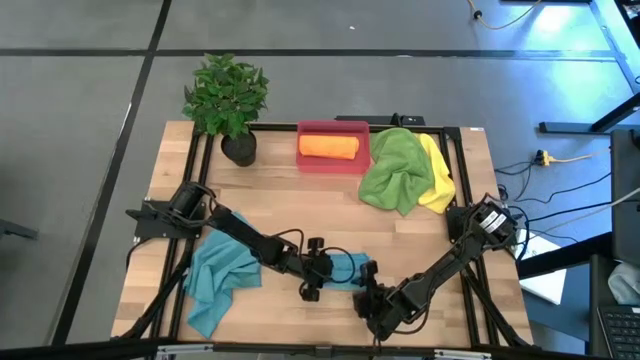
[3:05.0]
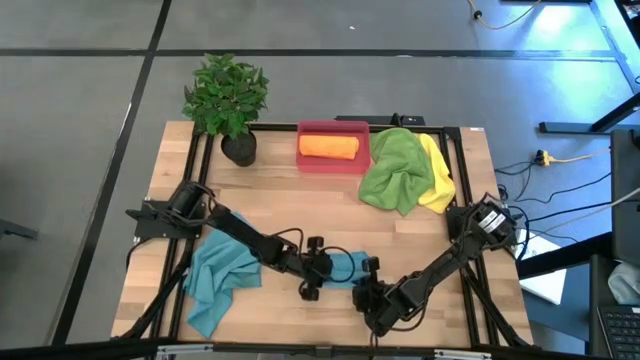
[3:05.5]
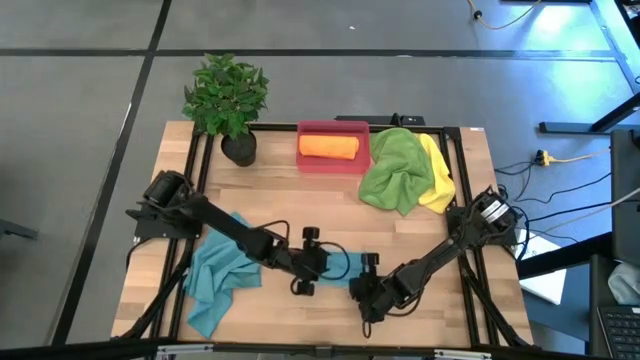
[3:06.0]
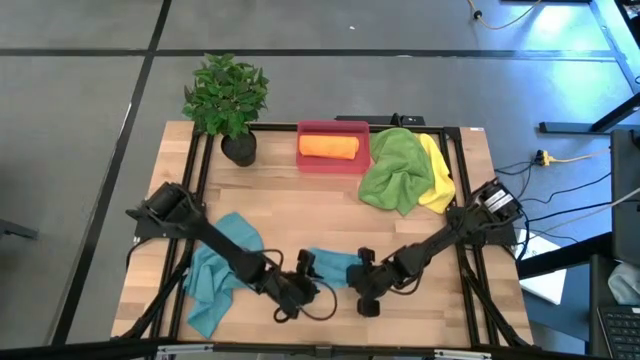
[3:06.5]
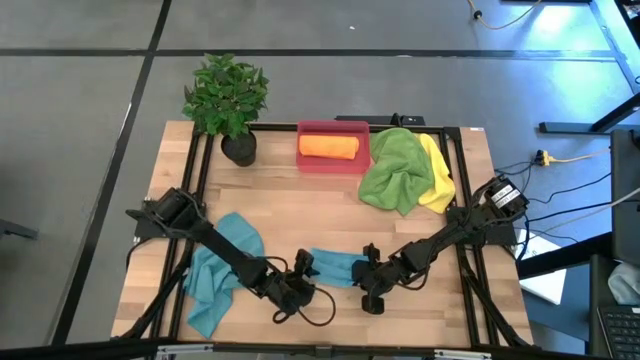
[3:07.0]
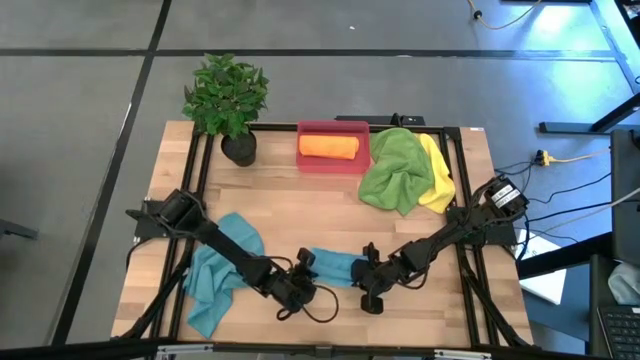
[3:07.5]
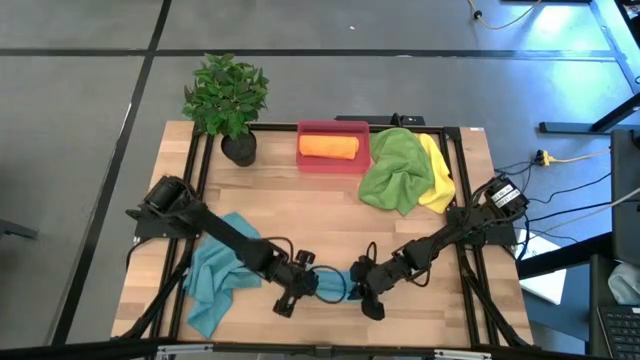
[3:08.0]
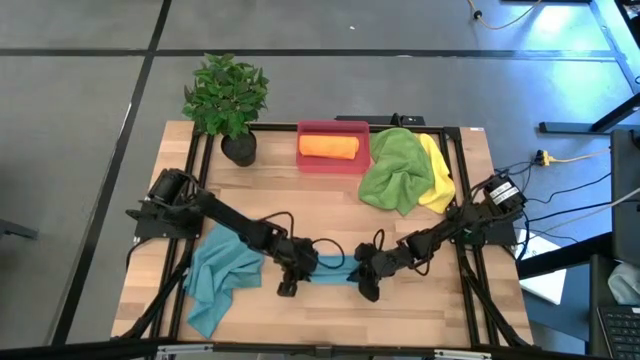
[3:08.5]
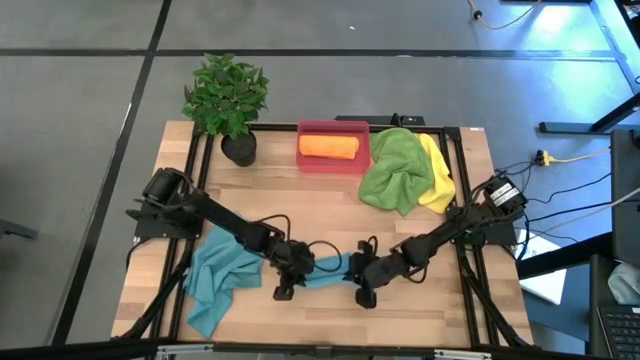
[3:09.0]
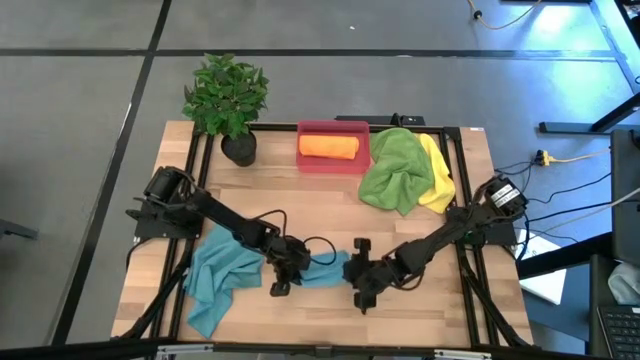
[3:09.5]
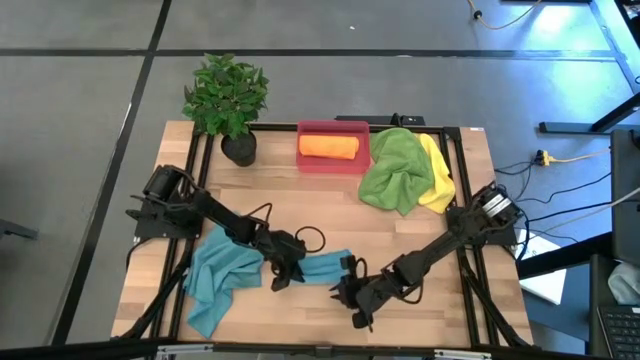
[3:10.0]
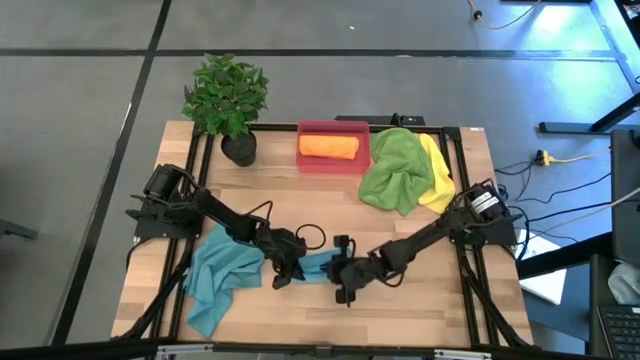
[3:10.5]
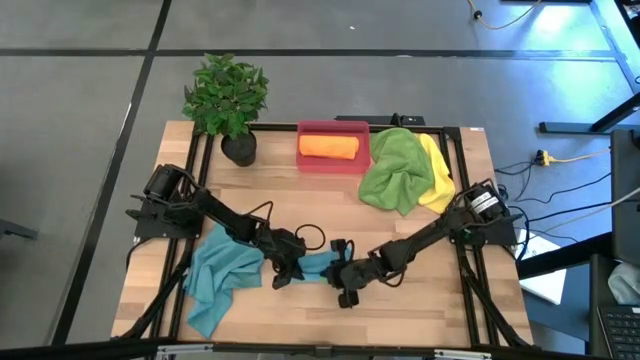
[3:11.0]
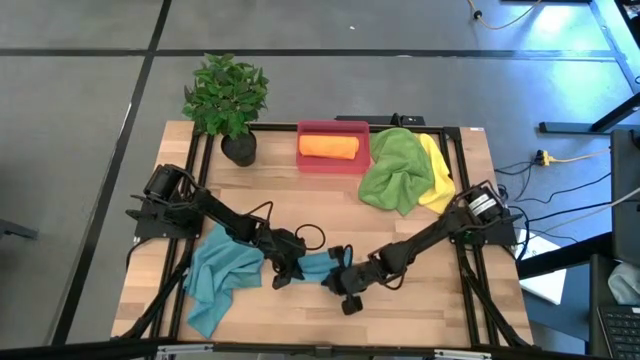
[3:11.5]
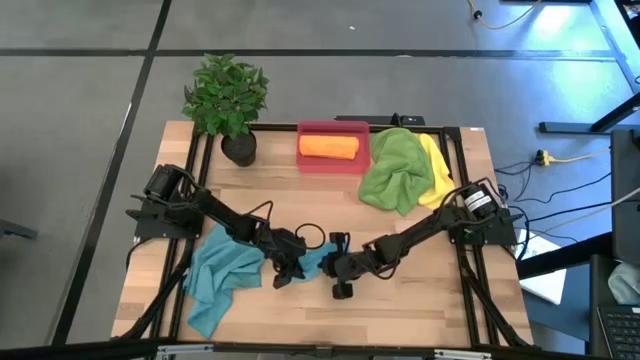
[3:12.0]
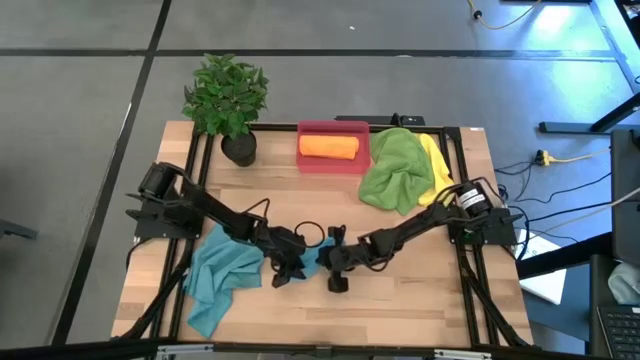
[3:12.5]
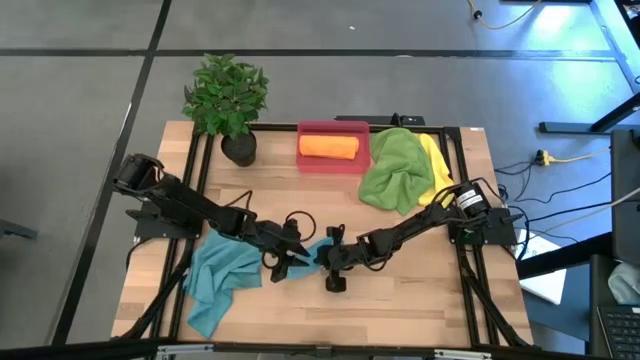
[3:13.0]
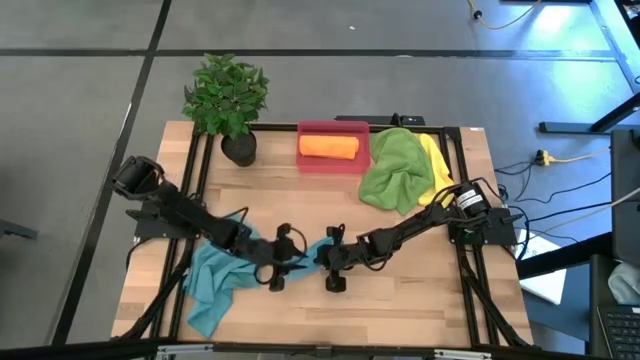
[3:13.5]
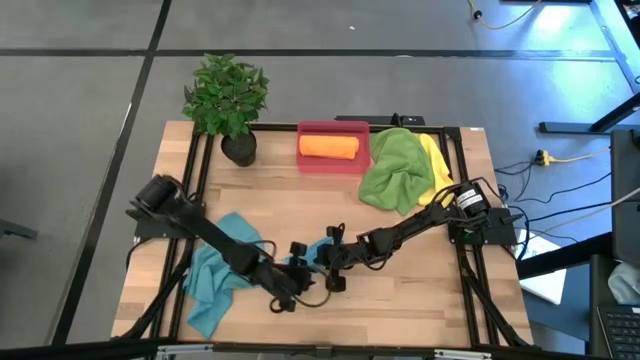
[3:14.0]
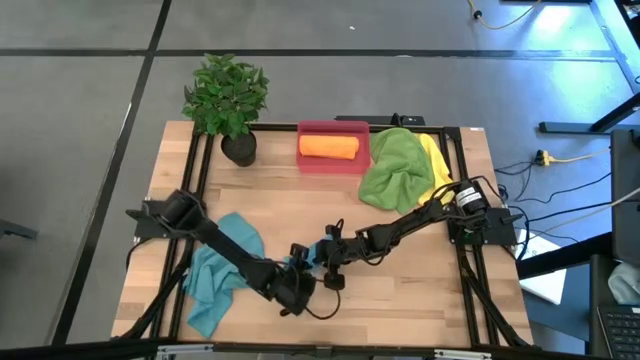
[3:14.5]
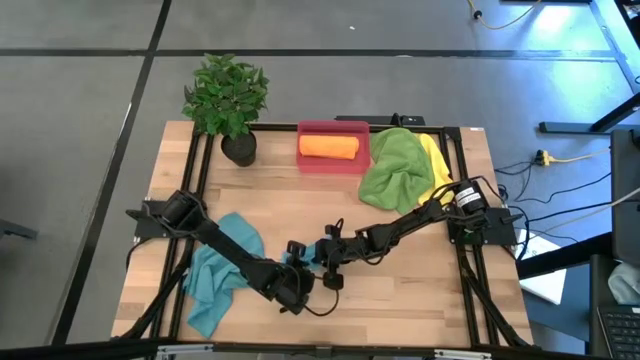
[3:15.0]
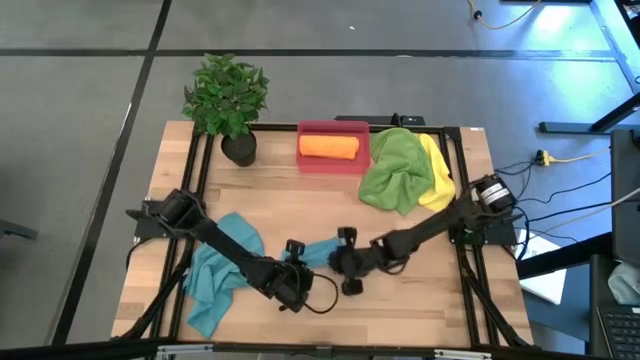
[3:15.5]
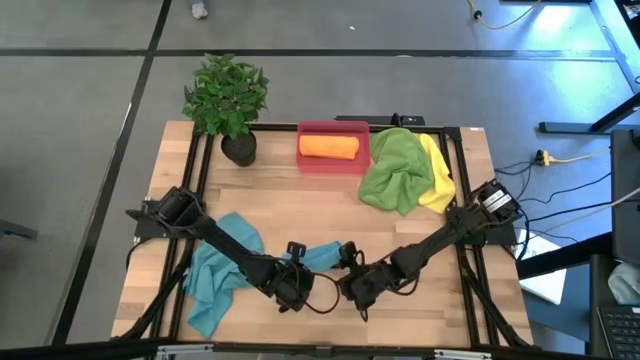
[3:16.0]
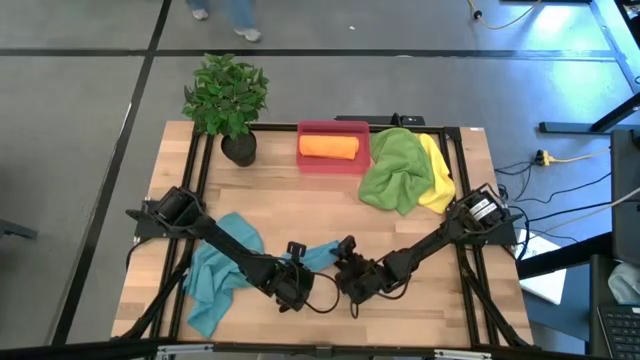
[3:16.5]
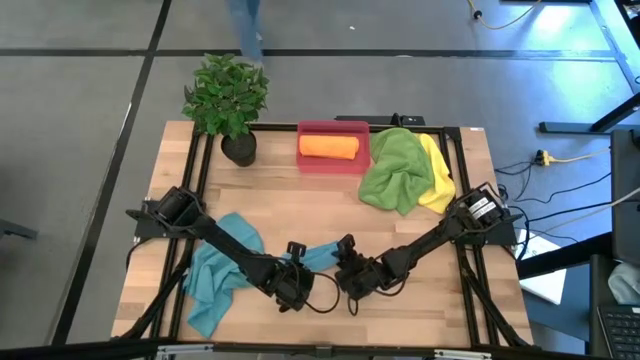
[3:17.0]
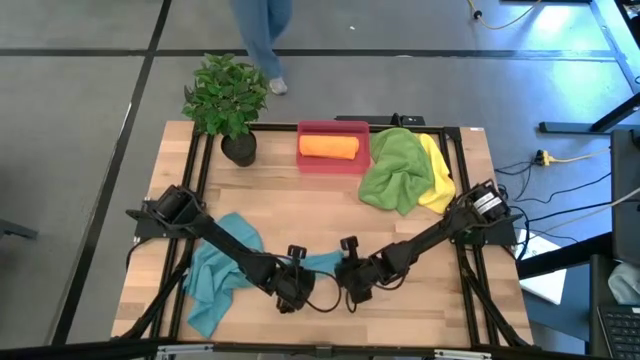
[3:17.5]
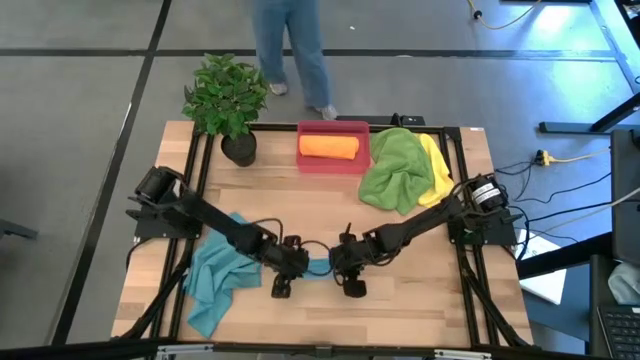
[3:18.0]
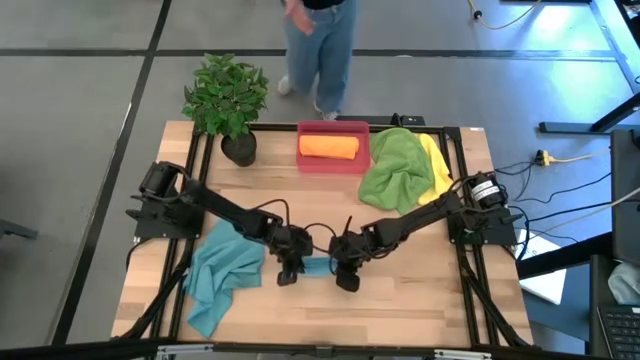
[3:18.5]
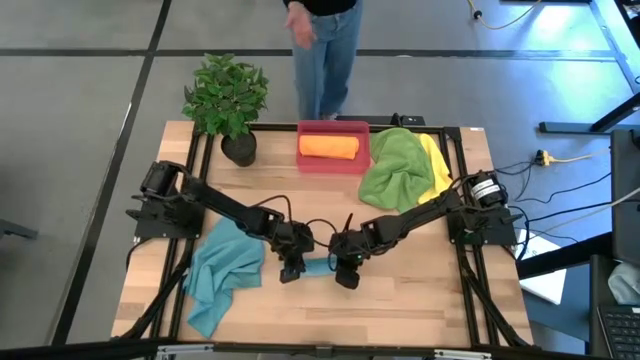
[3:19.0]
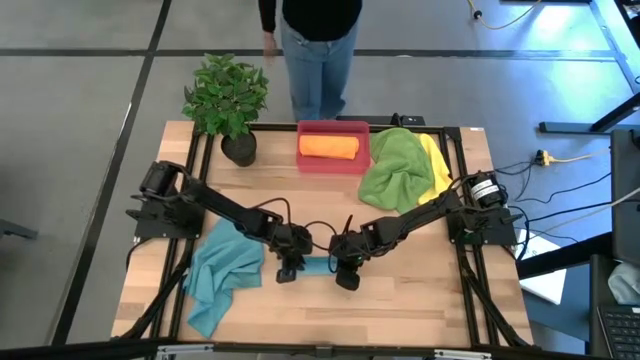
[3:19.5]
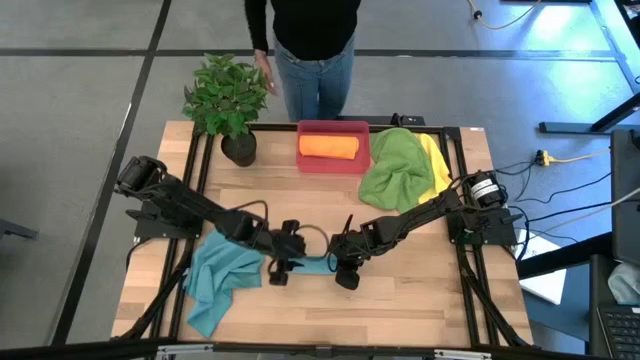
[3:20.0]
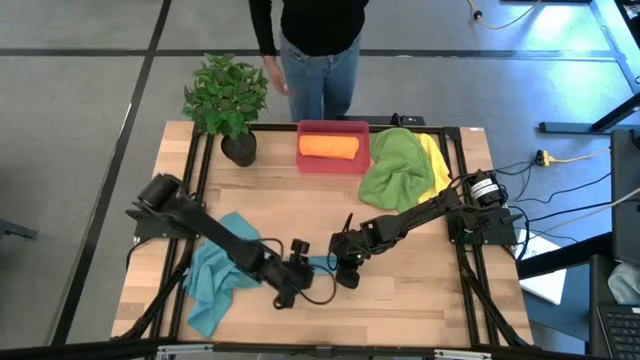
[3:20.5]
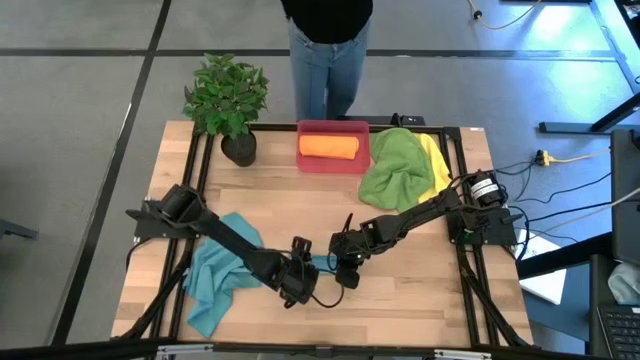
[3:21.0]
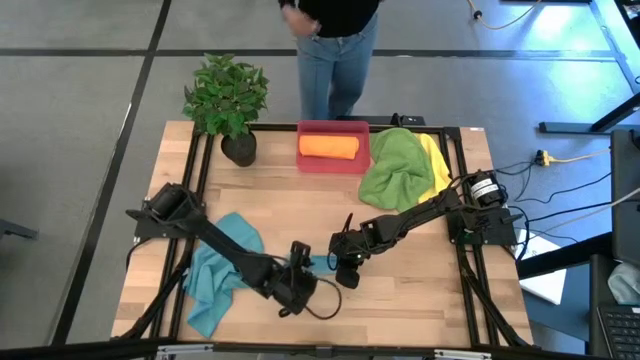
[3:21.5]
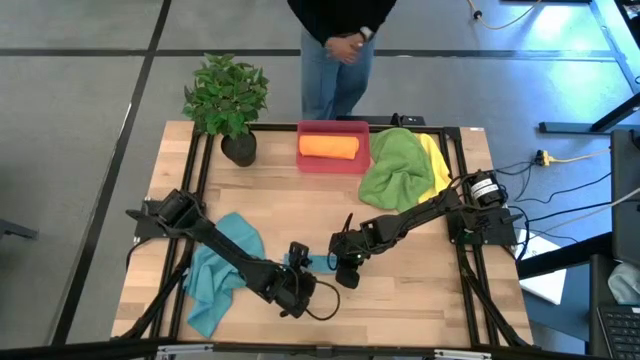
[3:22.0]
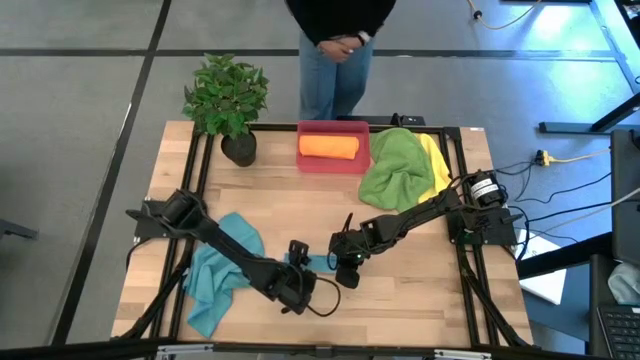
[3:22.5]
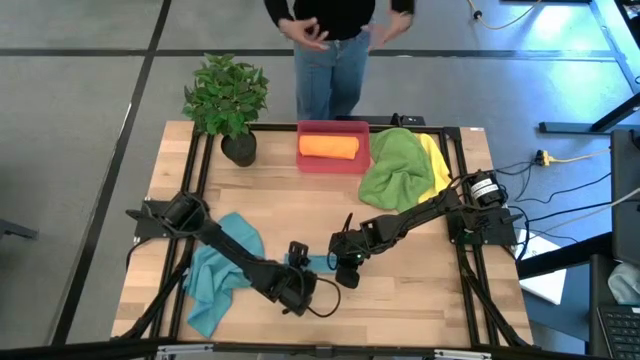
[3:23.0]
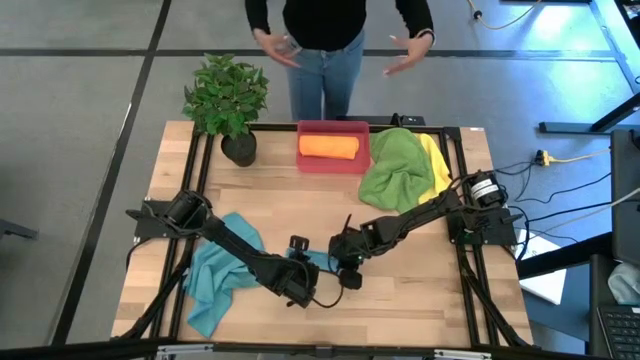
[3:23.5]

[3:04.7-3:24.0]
Task: Roll microfiber towels into tight, uniform cylinder then place into a basket
Roll the right blue towel

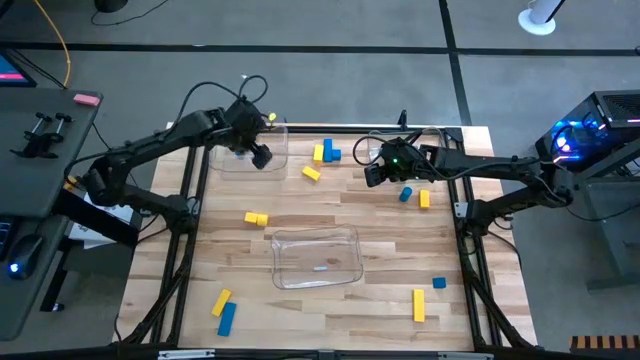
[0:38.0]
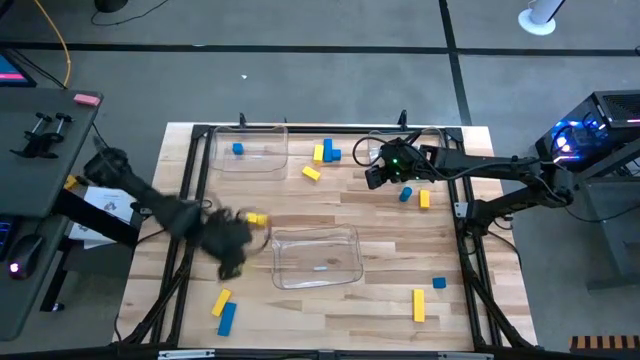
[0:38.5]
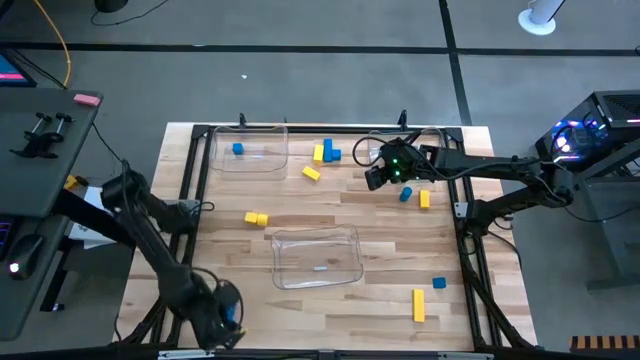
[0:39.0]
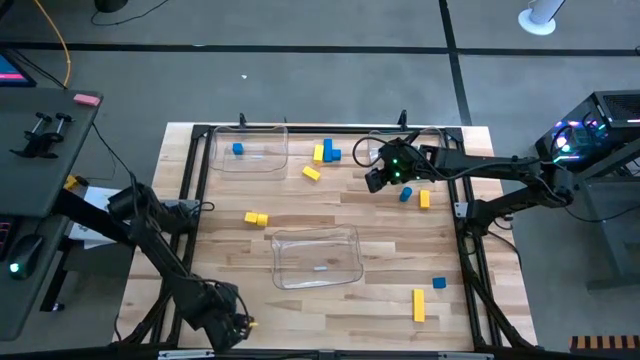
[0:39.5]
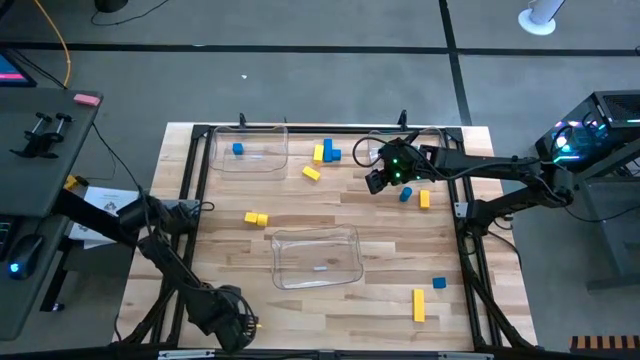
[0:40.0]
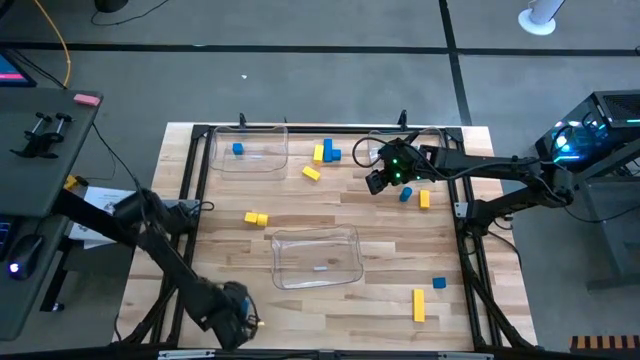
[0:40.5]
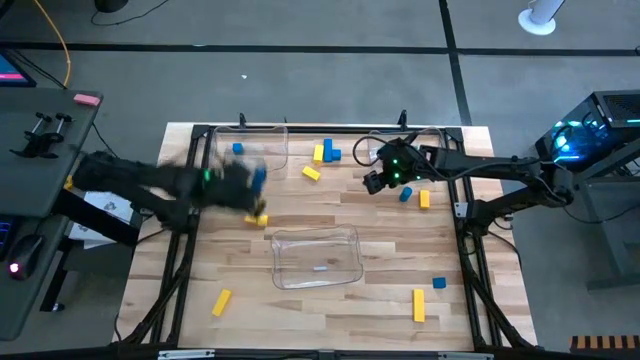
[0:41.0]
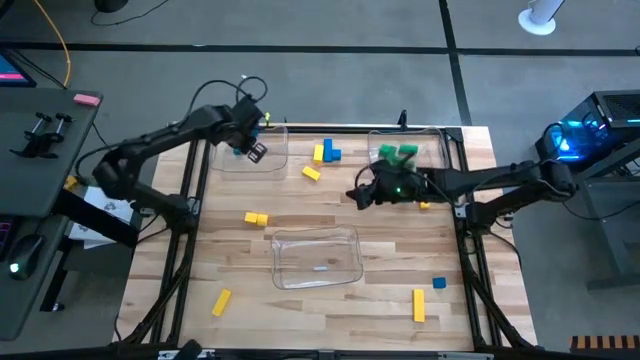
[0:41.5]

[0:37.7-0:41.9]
Task: Sort blocks
Put the blue block into the top left transparent bin
